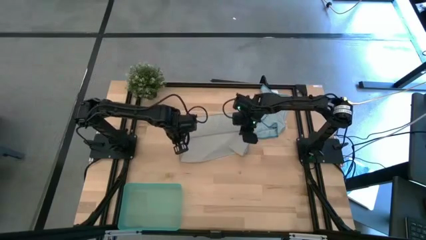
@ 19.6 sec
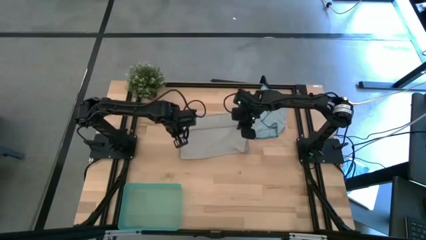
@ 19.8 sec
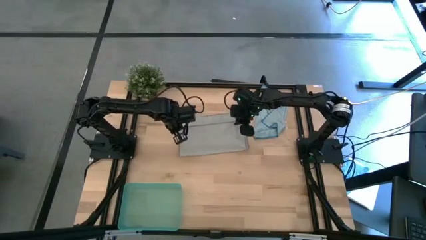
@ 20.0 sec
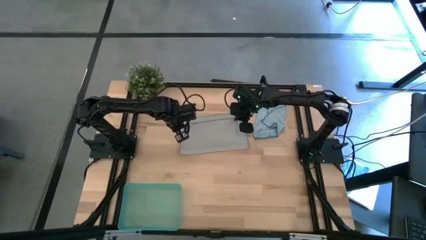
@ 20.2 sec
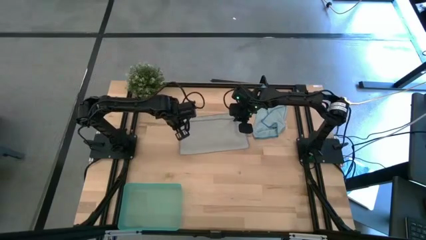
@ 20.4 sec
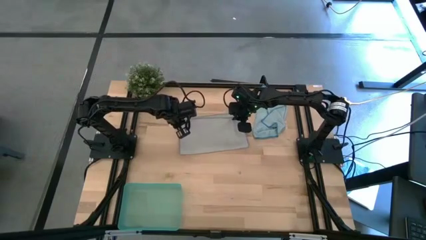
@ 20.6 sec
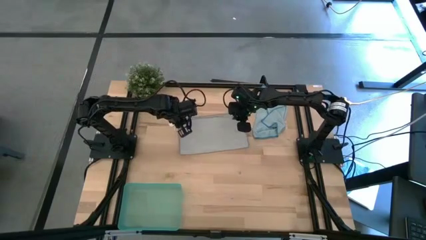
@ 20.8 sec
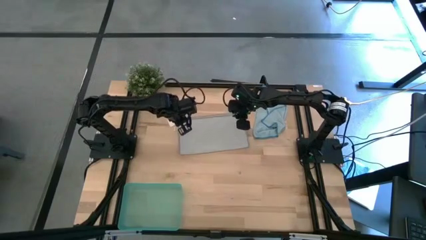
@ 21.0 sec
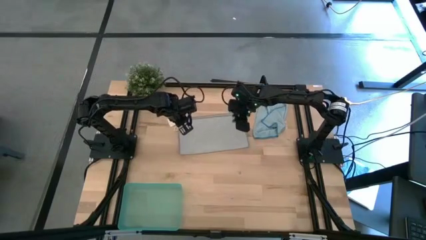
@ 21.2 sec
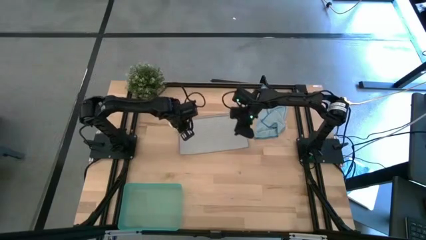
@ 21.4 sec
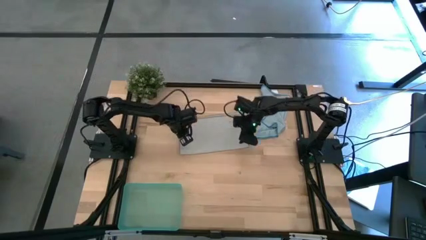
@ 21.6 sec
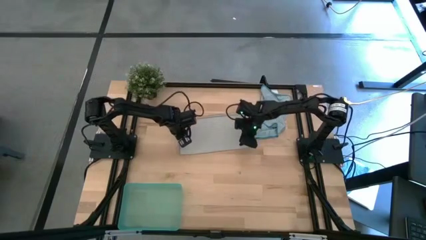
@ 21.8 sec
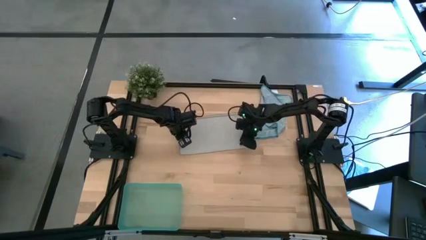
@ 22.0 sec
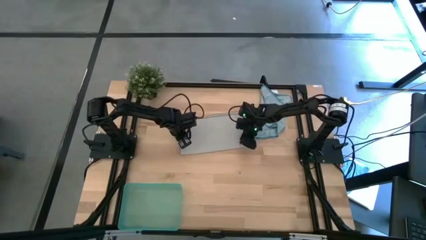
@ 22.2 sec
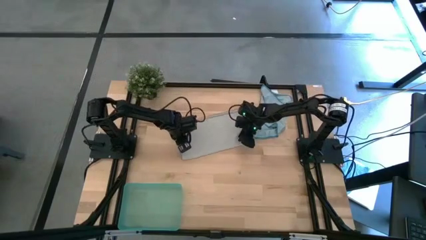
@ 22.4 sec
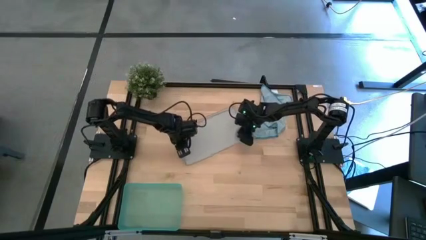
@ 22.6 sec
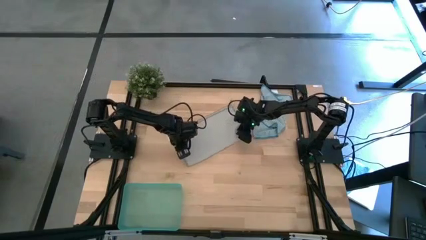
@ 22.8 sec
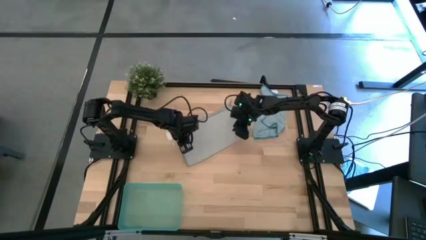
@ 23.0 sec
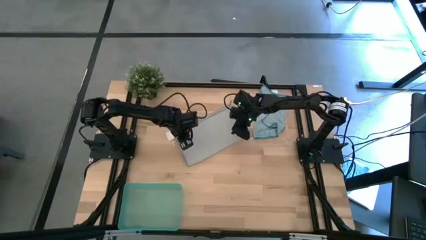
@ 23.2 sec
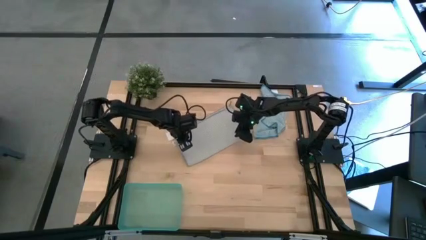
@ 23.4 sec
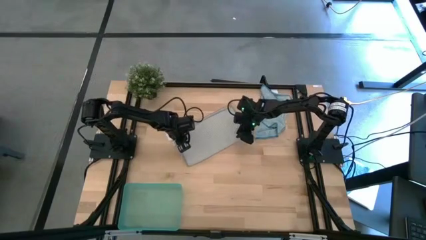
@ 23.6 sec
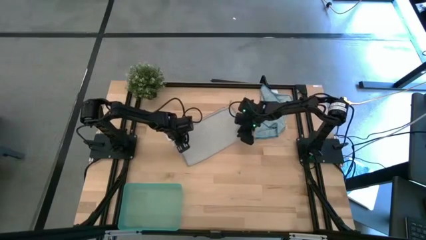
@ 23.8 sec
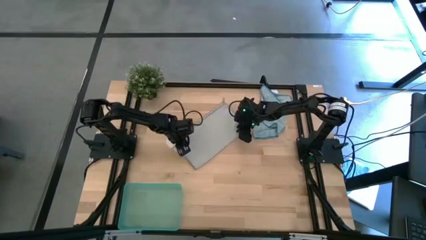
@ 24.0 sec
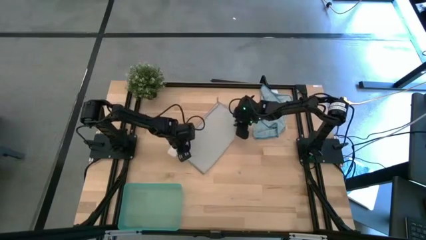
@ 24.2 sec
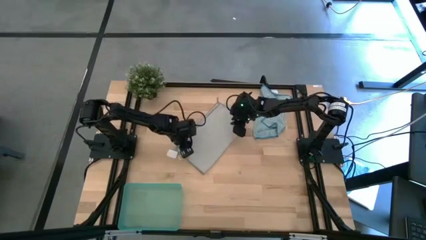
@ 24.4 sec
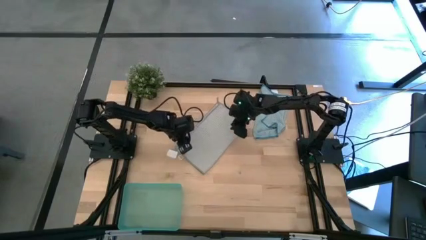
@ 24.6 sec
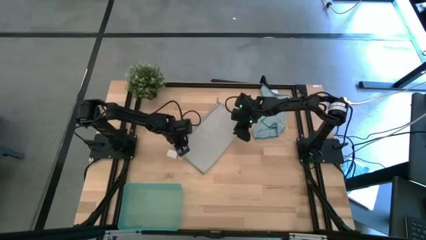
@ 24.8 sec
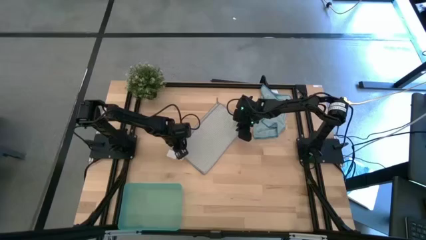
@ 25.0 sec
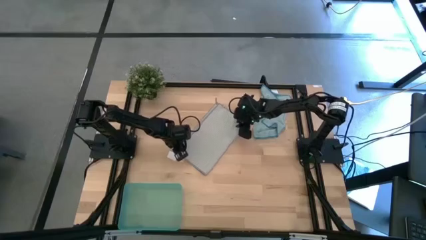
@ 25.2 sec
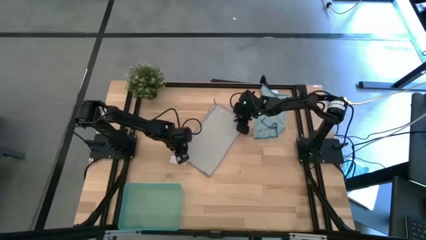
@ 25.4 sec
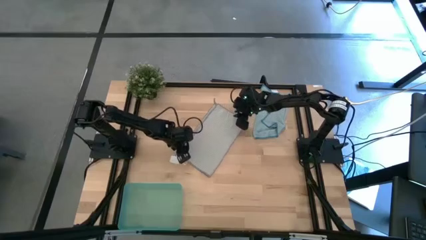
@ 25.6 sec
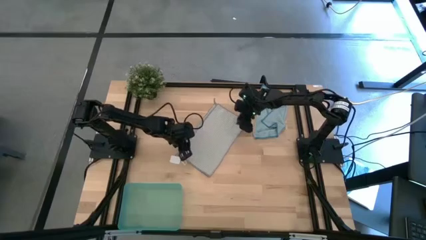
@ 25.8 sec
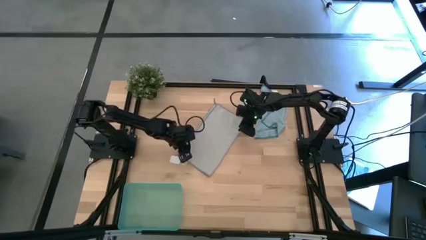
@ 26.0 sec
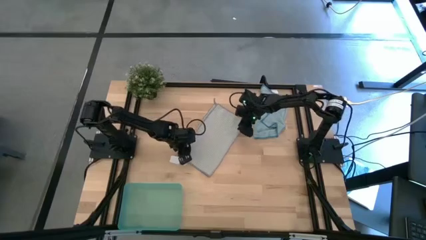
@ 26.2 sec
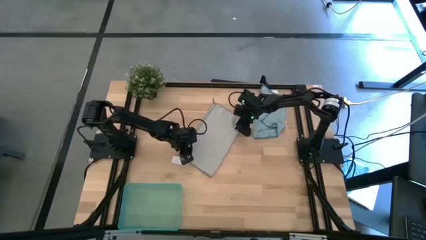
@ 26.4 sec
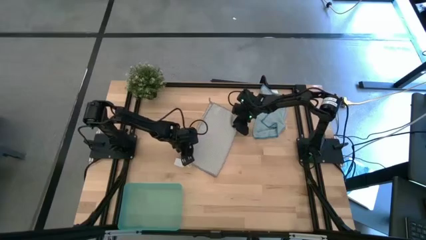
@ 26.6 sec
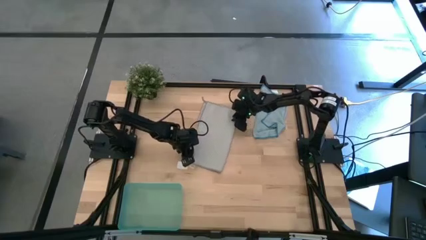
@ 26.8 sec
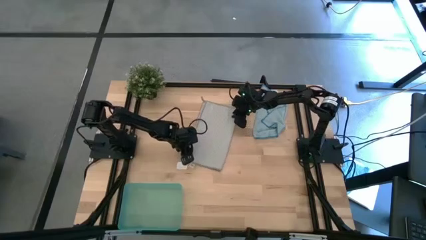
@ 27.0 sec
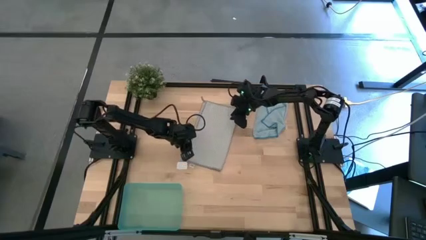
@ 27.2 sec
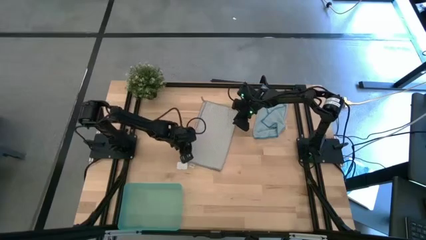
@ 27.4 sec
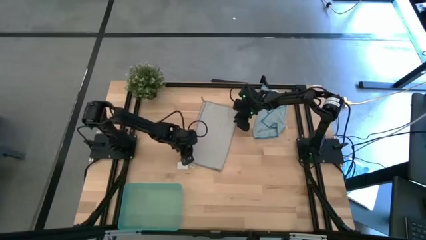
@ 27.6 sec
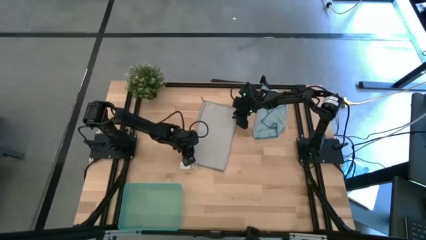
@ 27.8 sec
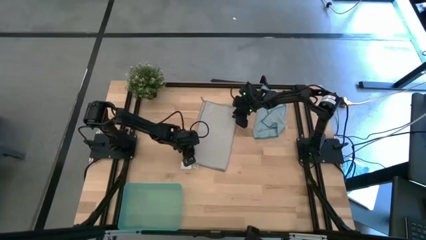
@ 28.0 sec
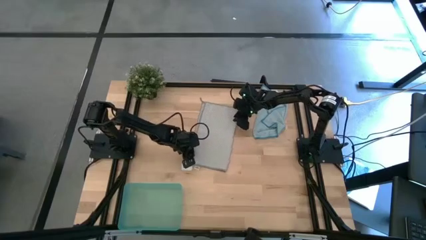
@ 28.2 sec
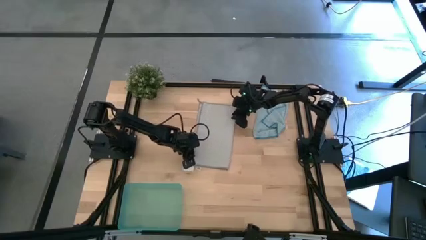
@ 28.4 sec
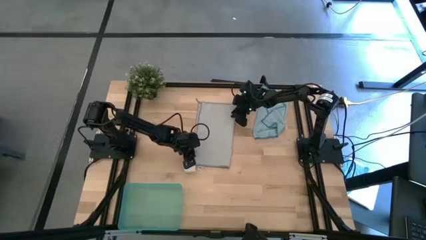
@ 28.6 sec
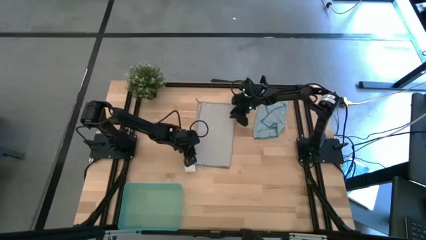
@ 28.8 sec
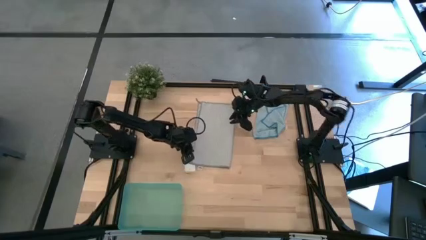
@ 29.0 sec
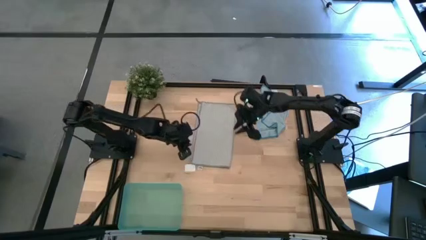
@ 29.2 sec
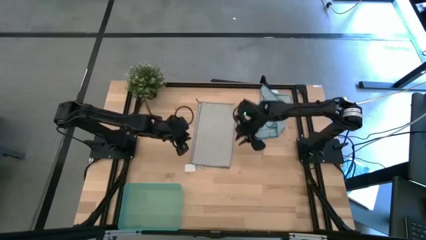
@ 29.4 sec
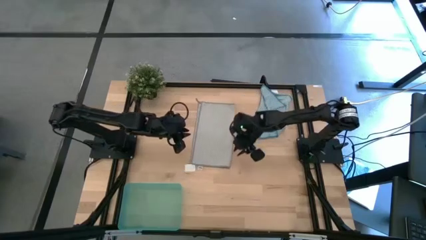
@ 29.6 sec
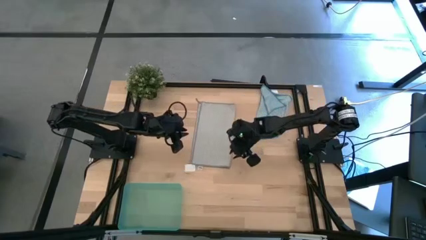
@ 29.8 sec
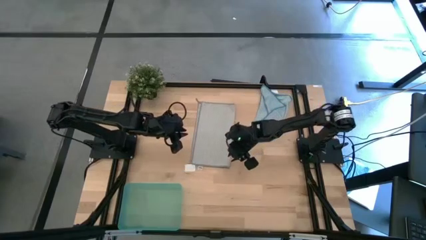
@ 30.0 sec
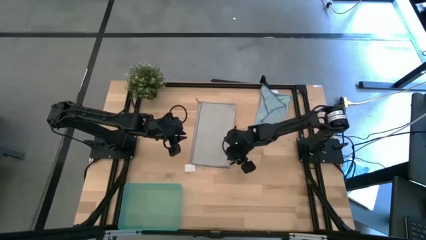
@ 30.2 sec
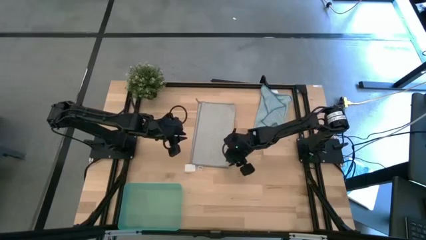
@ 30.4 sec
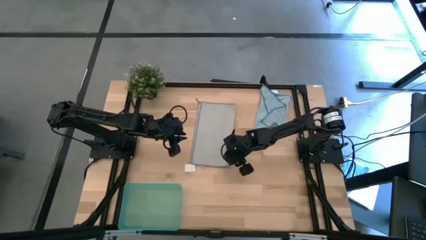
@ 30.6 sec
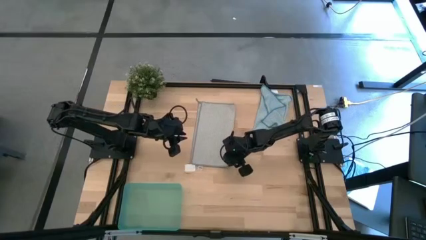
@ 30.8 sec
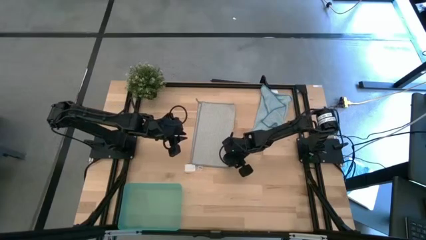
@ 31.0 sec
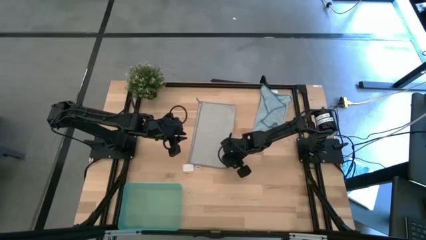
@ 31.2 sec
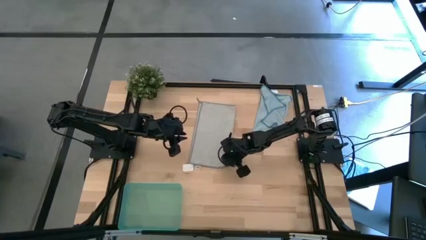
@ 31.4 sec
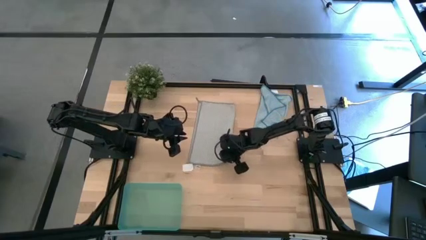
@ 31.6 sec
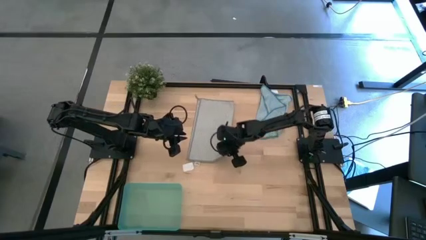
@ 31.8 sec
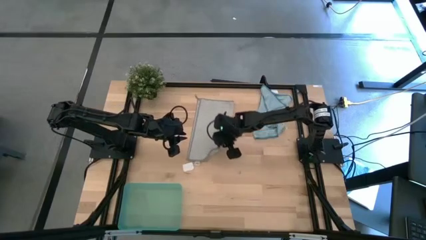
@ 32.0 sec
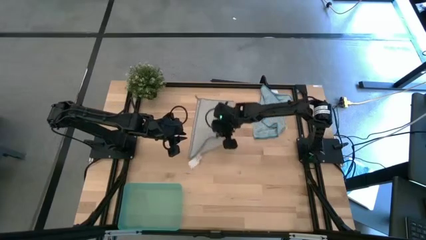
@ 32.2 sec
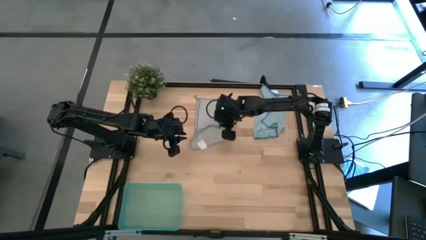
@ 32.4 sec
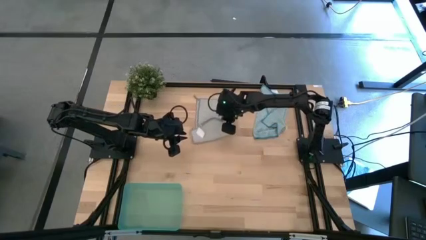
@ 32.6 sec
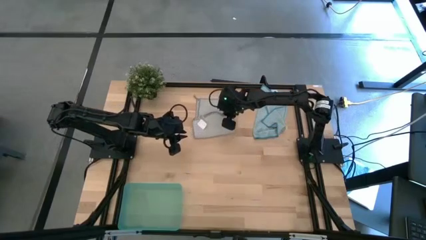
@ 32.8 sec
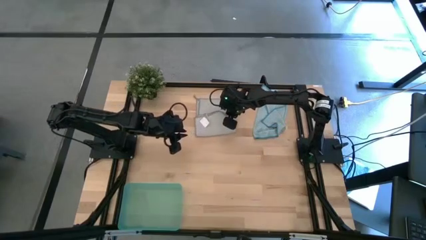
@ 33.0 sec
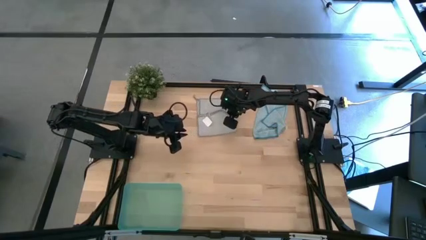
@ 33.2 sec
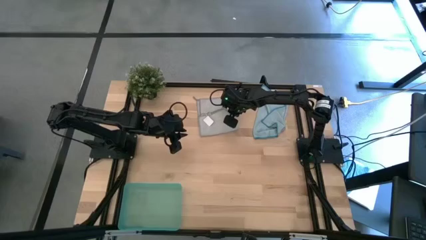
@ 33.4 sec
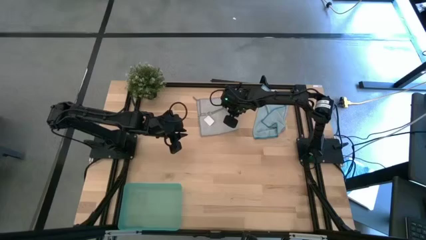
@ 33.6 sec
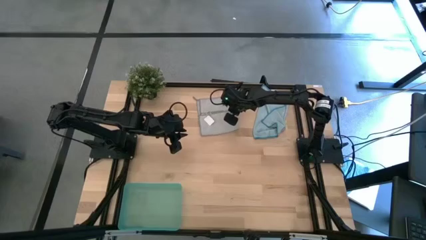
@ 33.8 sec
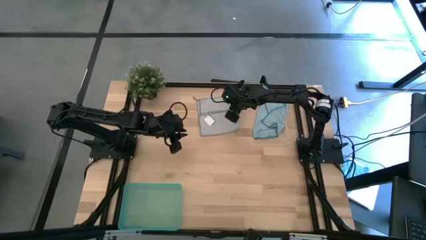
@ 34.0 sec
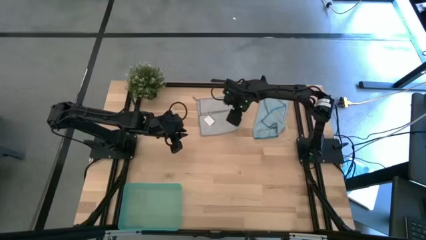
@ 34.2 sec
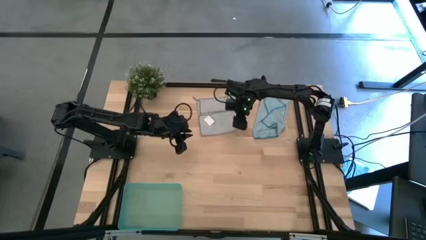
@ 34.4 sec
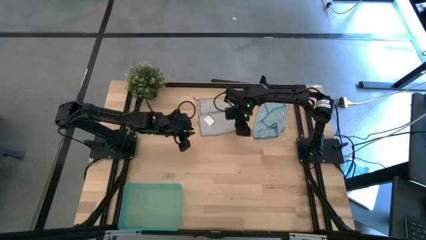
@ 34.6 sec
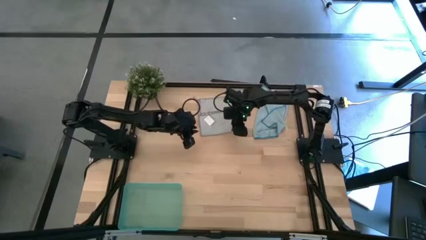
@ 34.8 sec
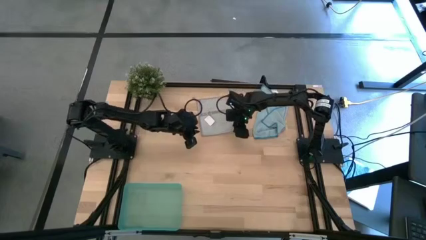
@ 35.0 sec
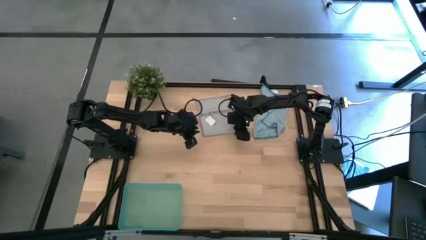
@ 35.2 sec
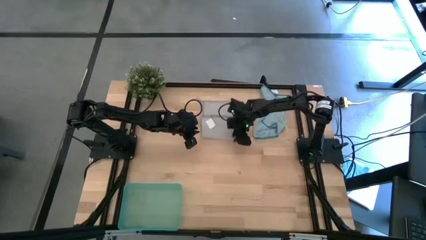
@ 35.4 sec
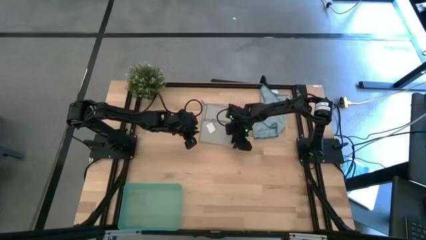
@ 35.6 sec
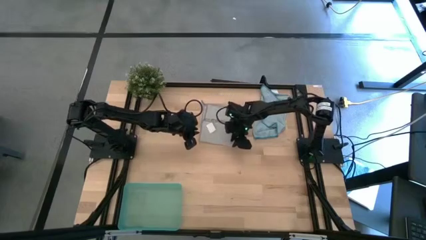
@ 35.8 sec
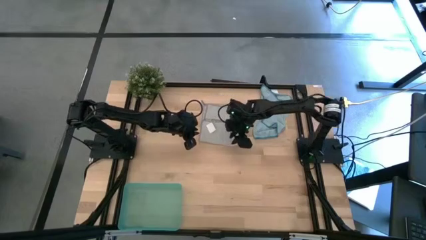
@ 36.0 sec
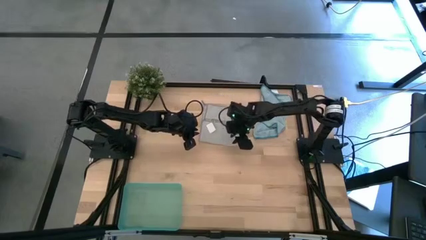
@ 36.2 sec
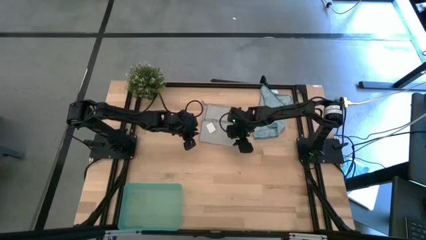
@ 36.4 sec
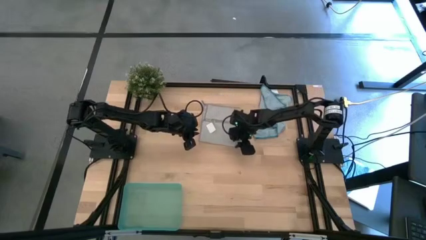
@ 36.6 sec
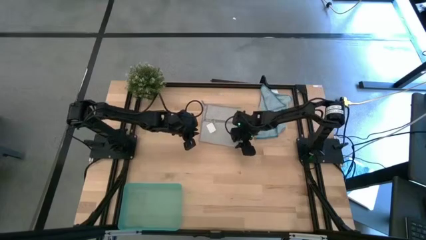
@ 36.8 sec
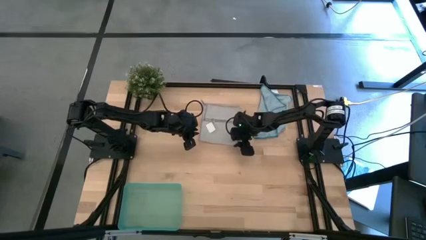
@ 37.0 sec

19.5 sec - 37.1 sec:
Task: Roll microfiber towels into tight, uniform cylinder then place into a basket
Roll the gray microfiber cloth
